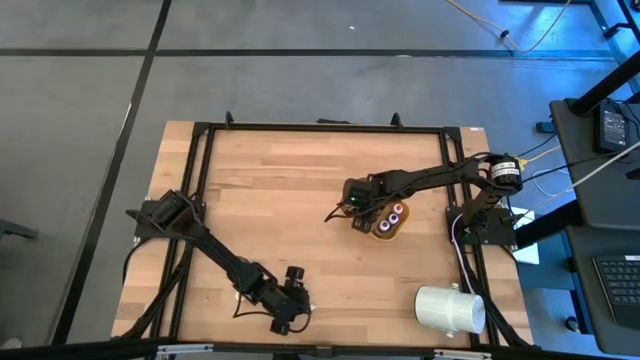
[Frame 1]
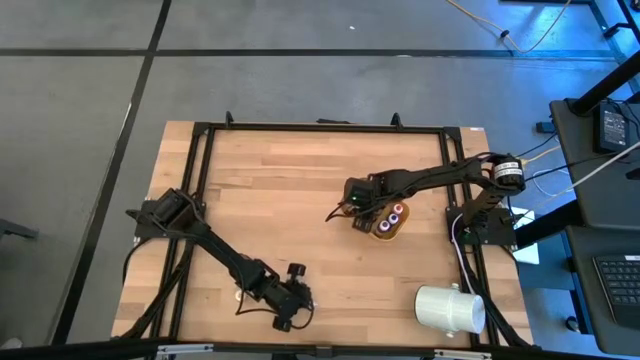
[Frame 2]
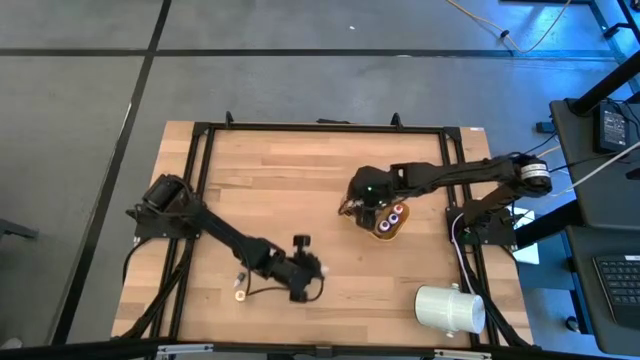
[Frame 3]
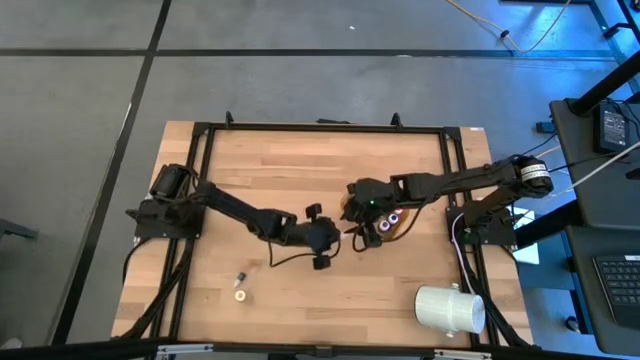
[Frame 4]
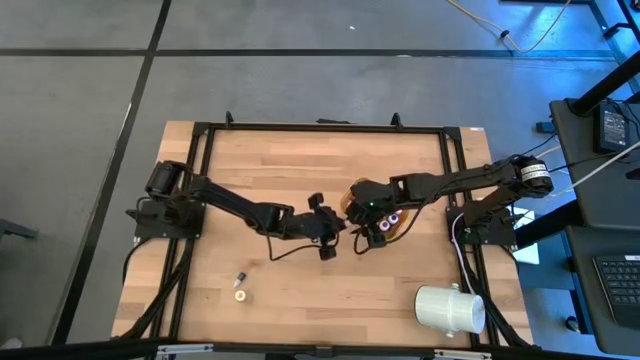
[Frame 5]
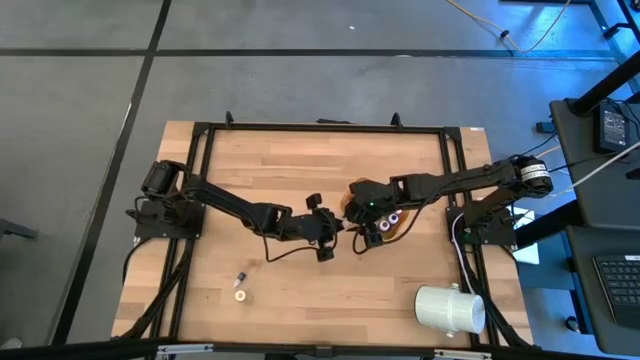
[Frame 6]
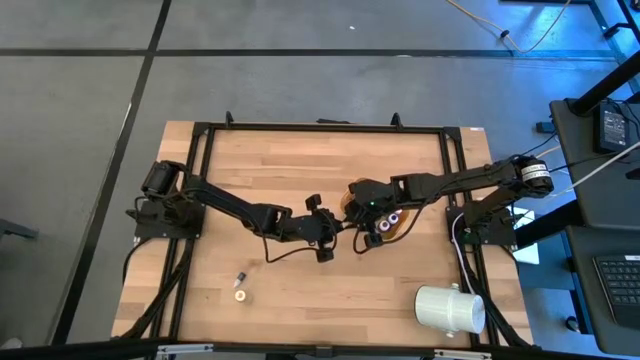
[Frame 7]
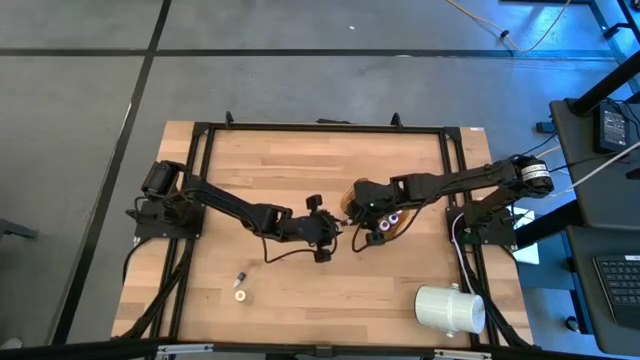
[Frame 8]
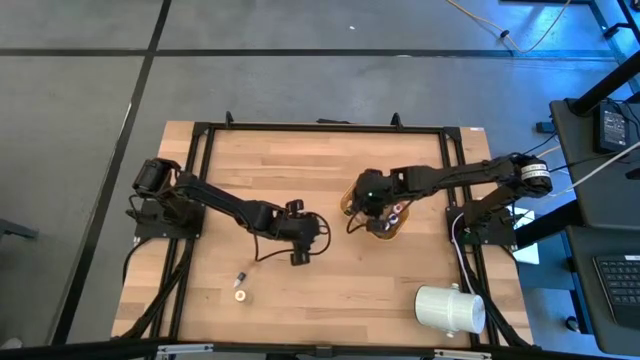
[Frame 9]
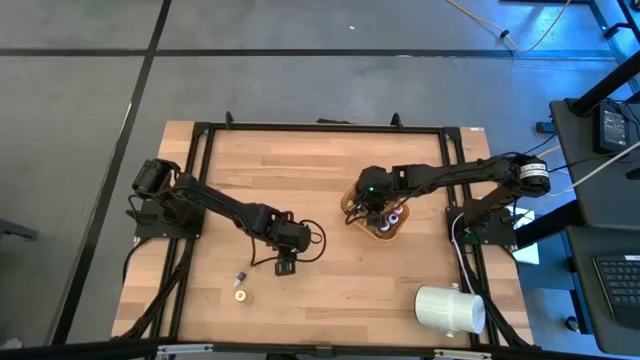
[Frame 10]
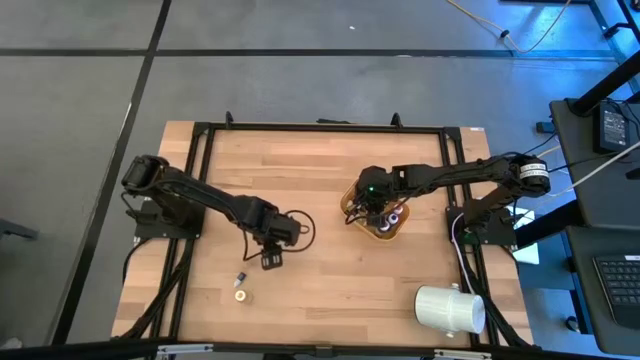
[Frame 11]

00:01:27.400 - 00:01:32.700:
Task: Pick & Place food coloring
Put the small black food coloring bottle in the yellow bin

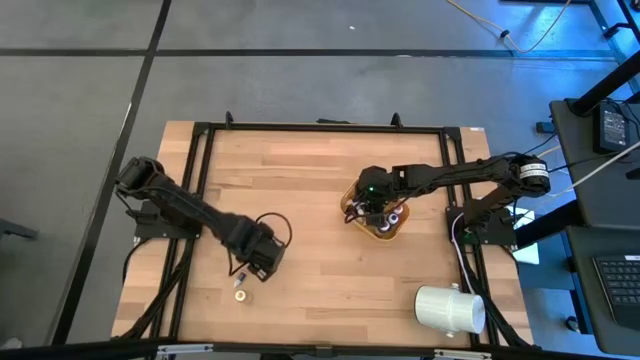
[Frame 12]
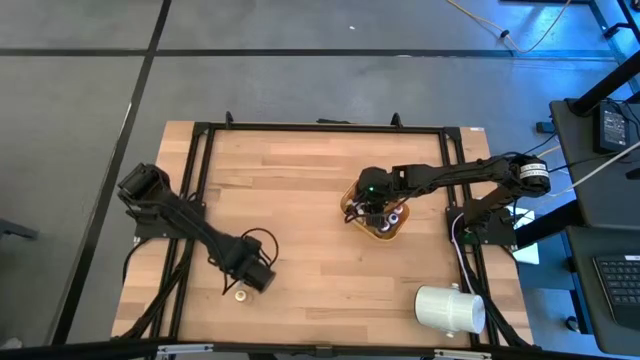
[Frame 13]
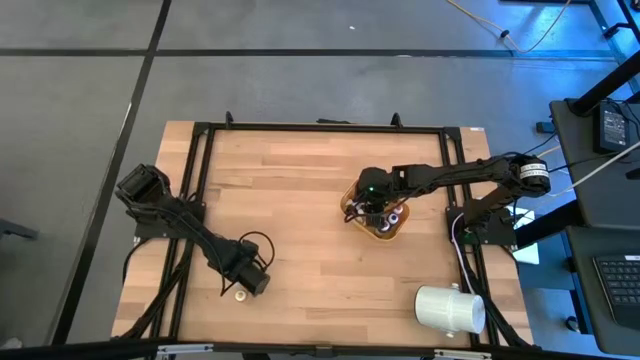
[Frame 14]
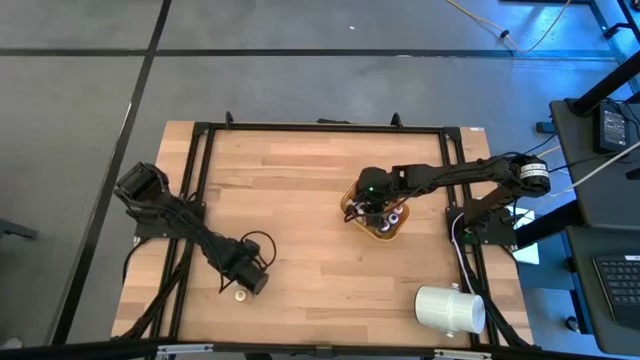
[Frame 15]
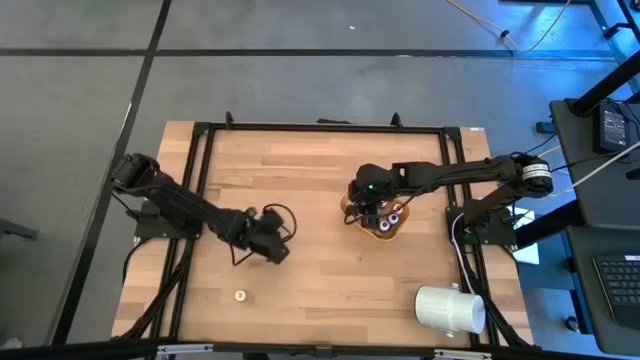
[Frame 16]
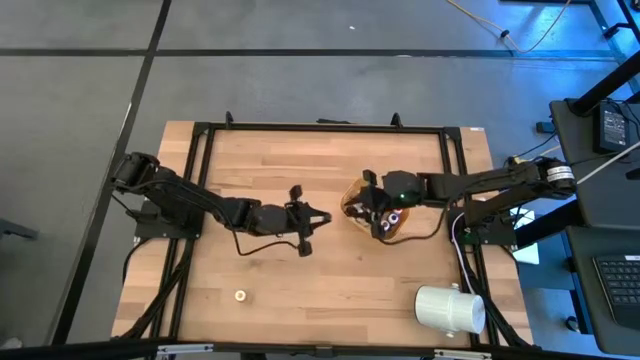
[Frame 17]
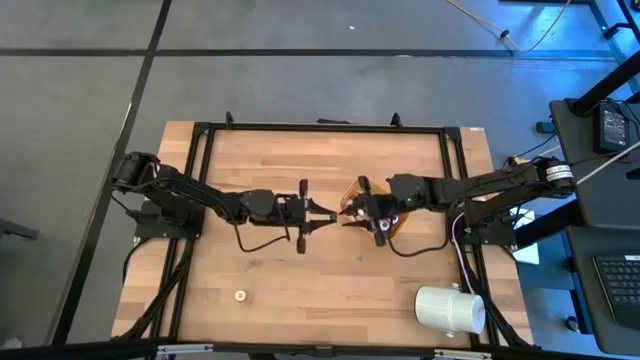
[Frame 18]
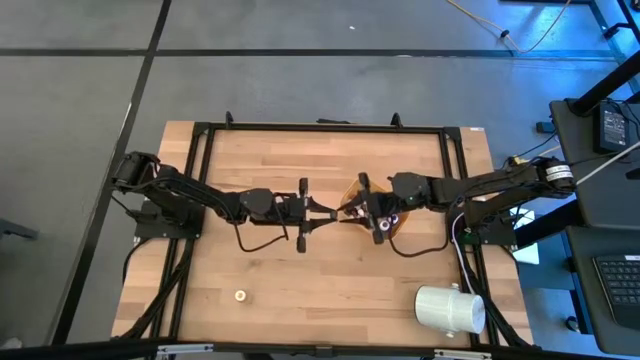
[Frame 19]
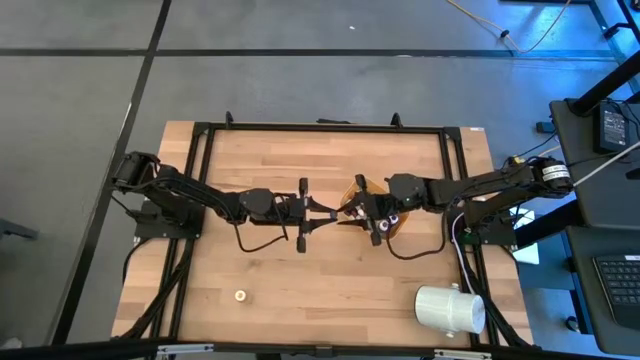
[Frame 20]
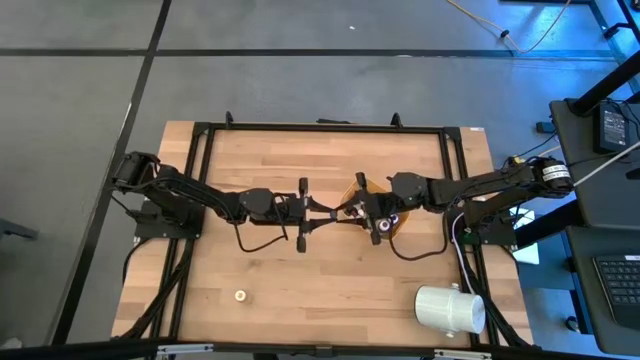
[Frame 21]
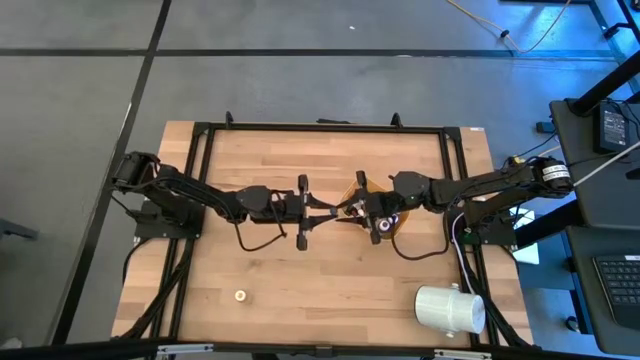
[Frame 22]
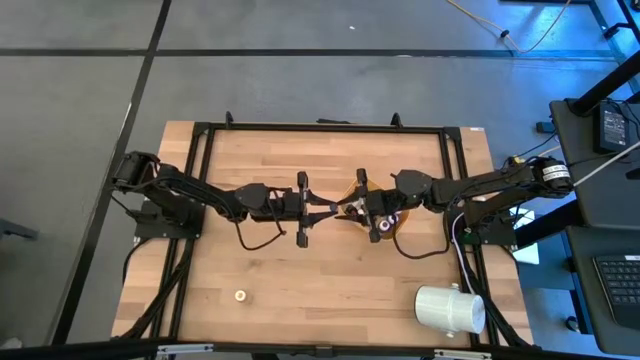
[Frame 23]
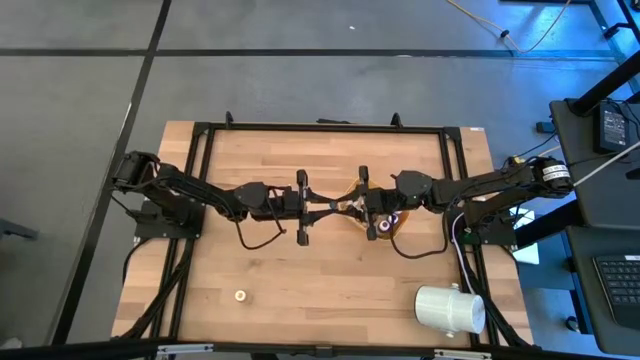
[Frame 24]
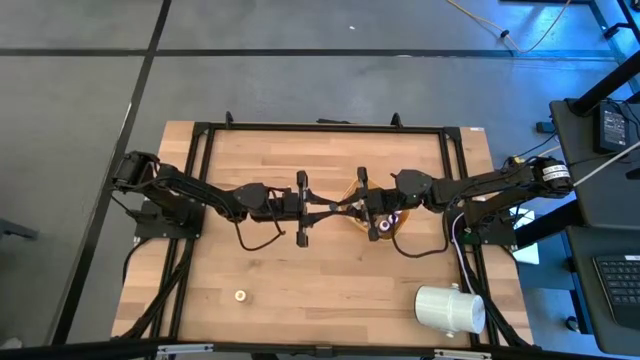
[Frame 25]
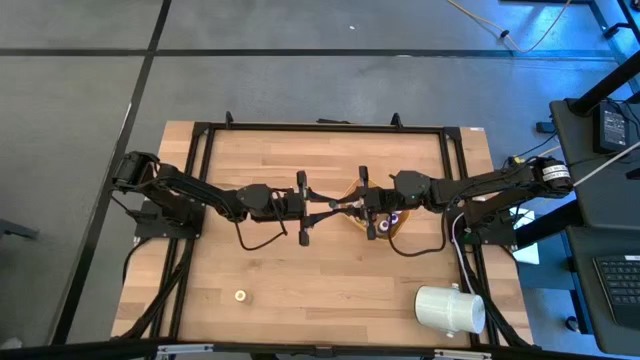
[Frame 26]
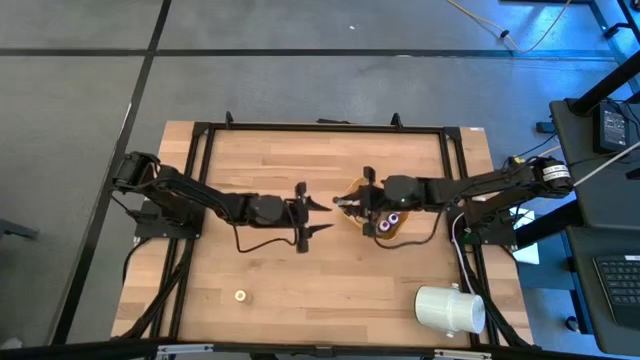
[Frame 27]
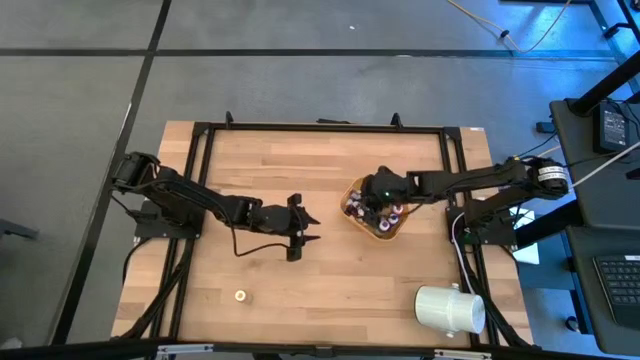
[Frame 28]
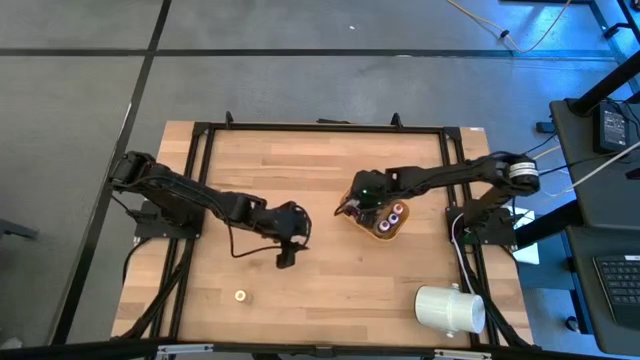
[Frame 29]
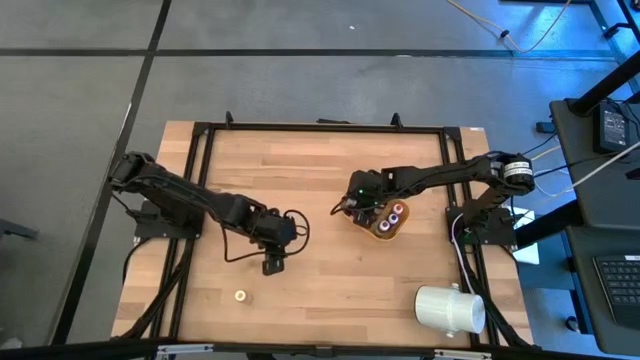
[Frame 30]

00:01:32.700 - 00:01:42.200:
Put the small blue food coloring bottle in the yellow bin

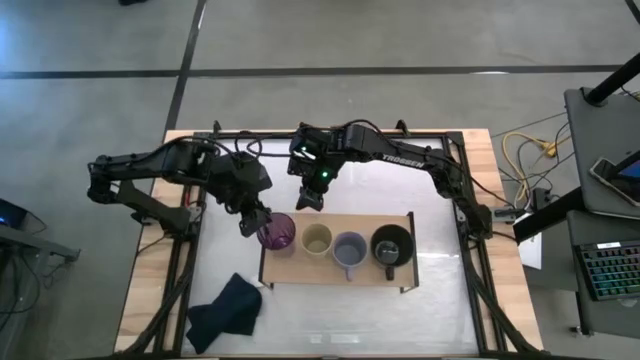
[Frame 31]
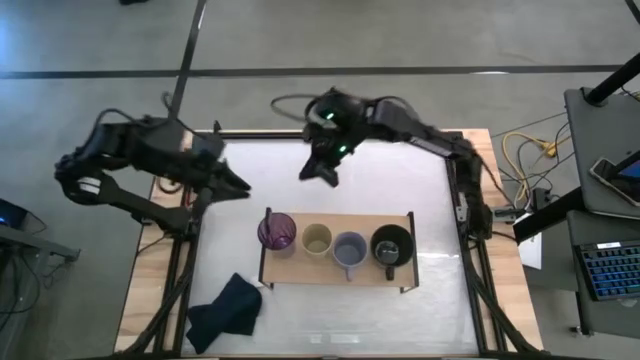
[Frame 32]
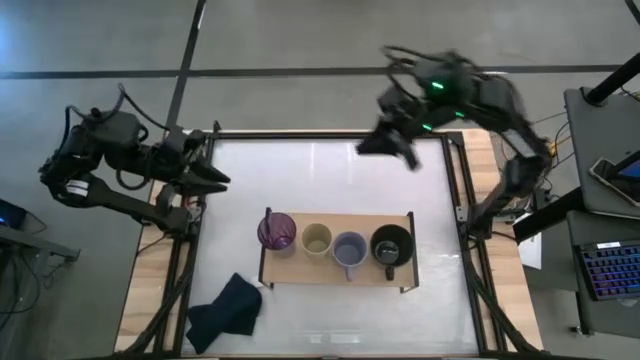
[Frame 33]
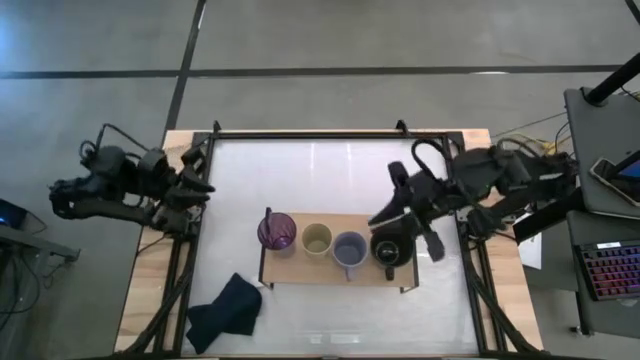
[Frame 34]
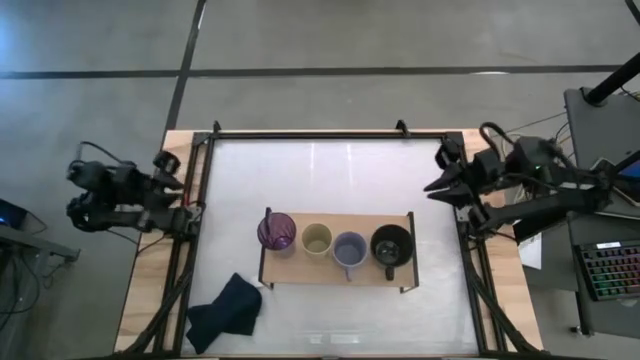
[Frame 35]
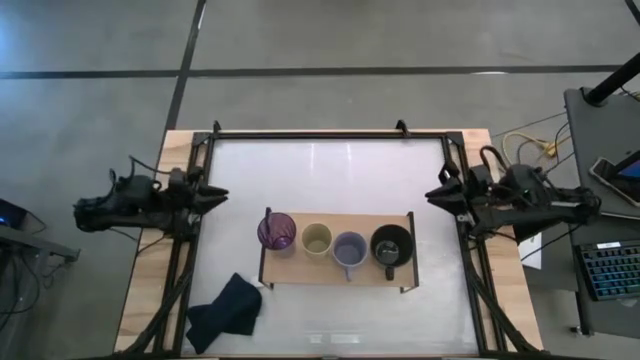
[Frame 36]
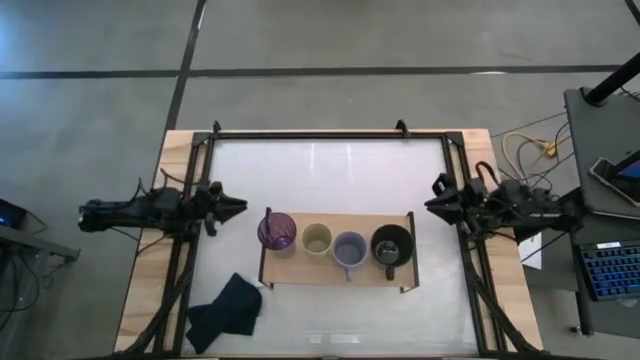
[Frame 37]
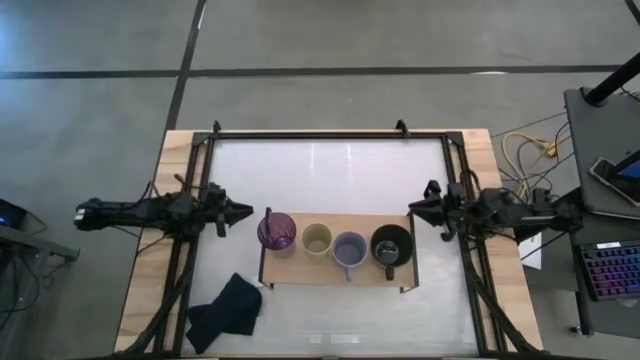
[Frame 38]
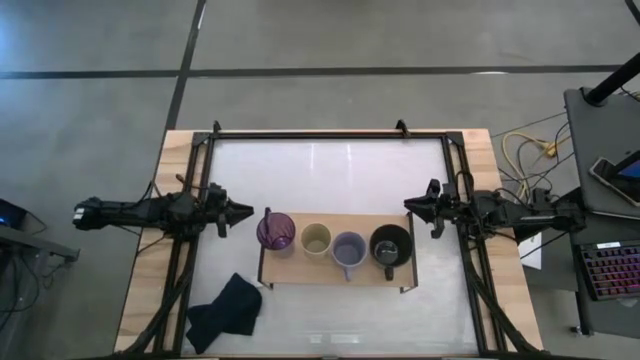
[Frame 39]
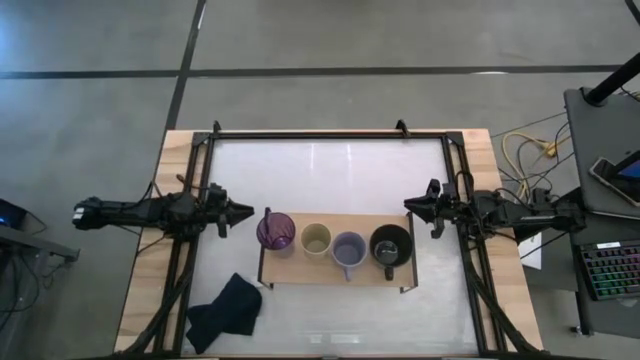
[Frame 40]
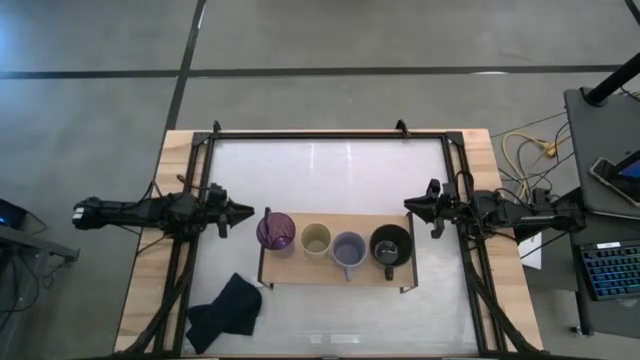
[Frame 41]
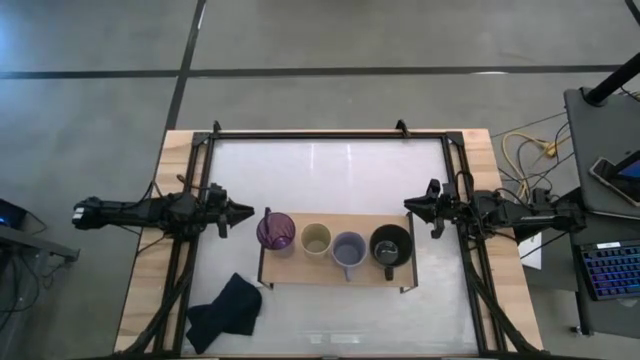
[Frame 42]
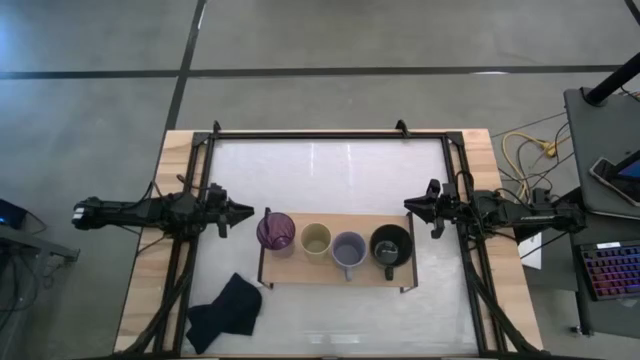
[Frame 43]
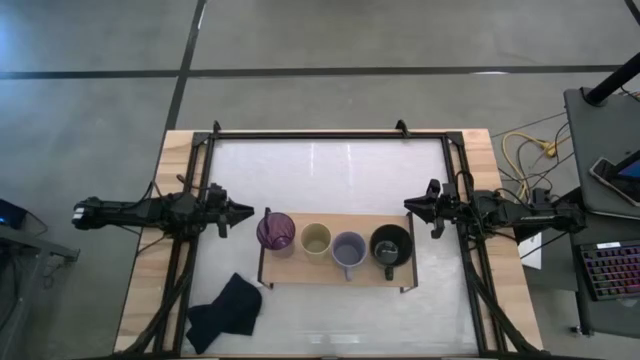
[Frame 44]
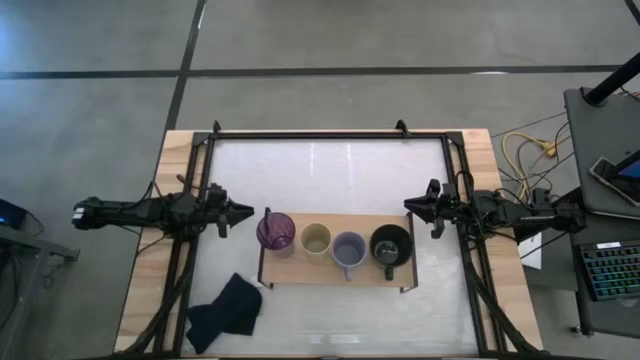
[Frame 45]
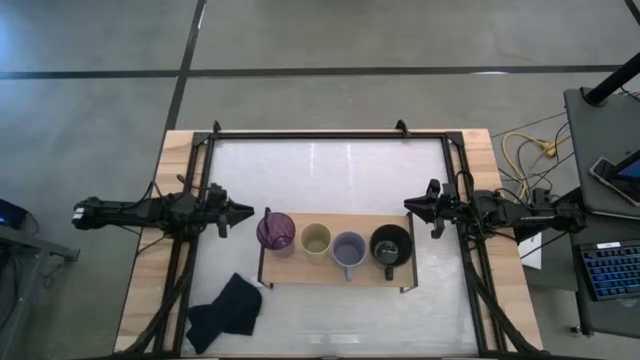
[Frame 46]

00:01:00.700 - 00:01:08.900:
Task: Stack small to large cups/mugs on shelf
Return to Home Position
